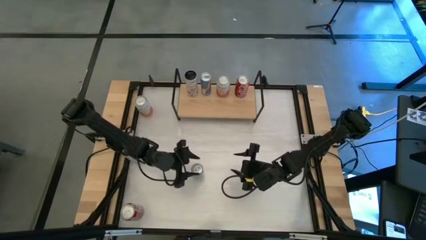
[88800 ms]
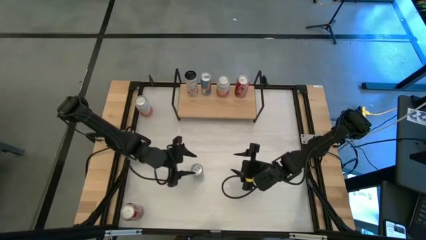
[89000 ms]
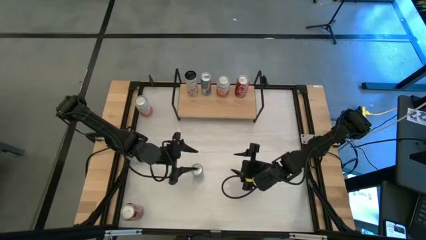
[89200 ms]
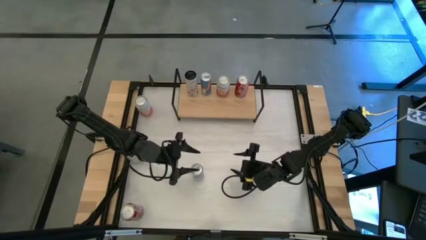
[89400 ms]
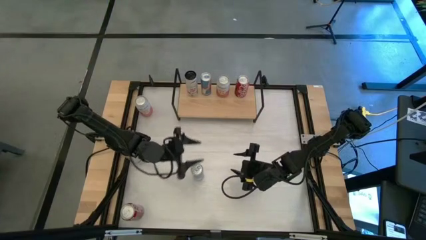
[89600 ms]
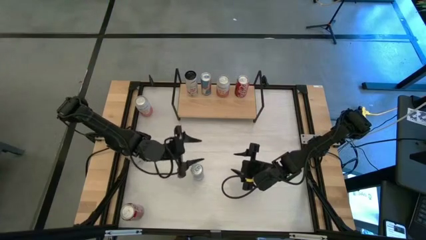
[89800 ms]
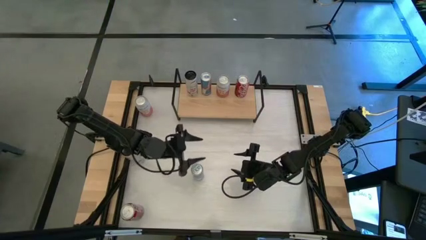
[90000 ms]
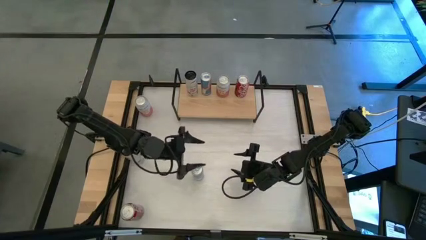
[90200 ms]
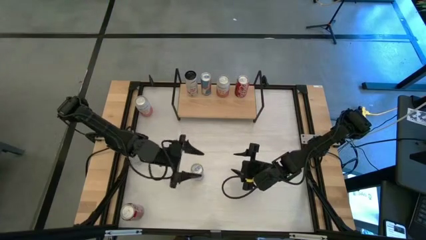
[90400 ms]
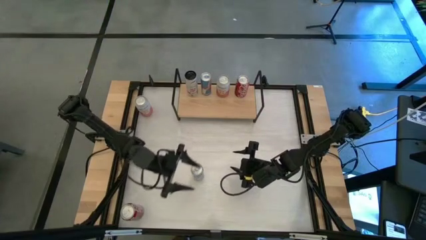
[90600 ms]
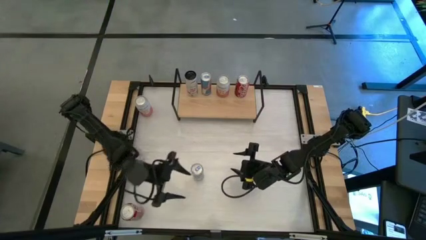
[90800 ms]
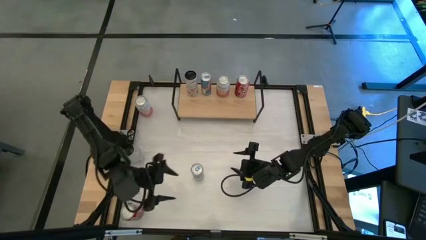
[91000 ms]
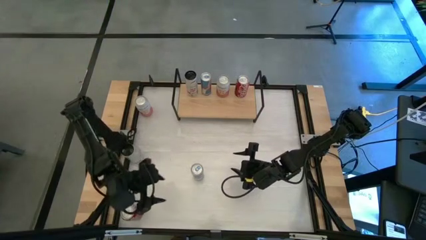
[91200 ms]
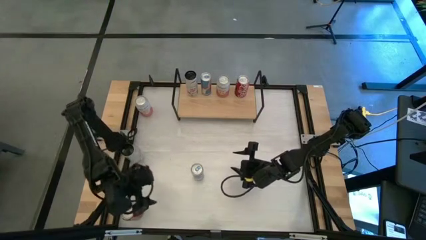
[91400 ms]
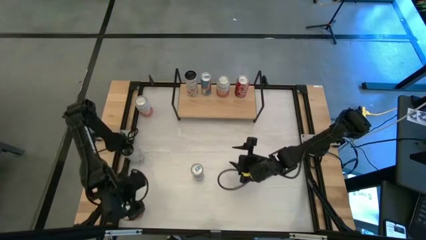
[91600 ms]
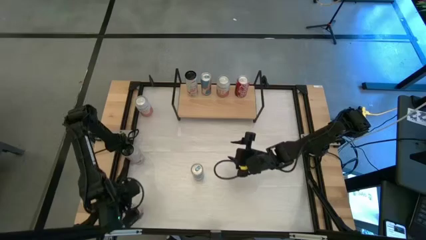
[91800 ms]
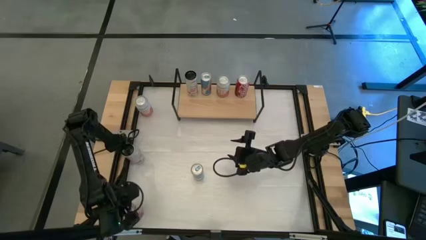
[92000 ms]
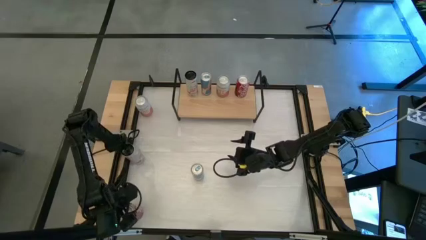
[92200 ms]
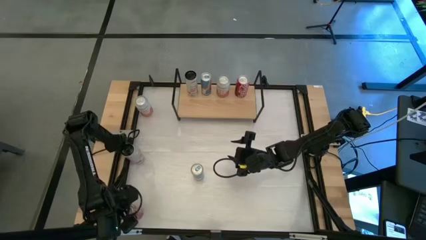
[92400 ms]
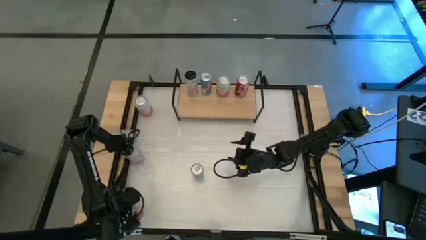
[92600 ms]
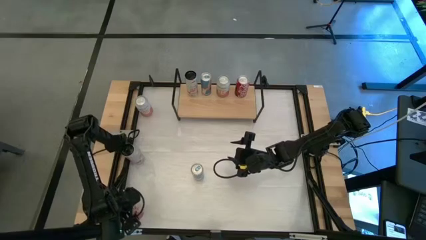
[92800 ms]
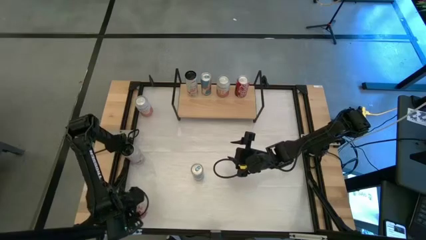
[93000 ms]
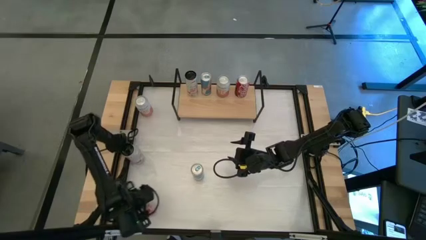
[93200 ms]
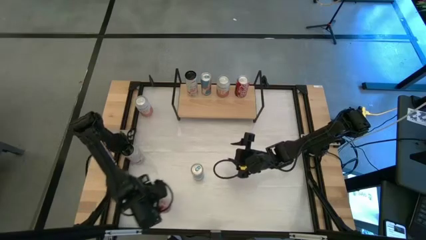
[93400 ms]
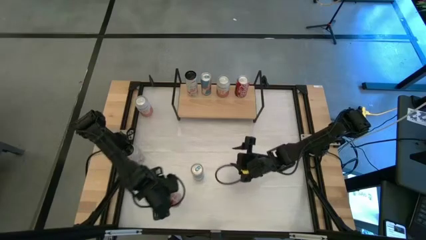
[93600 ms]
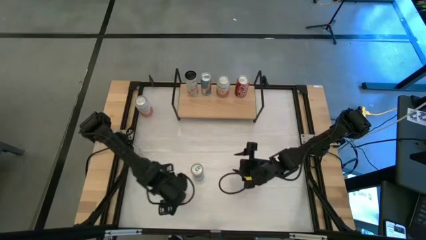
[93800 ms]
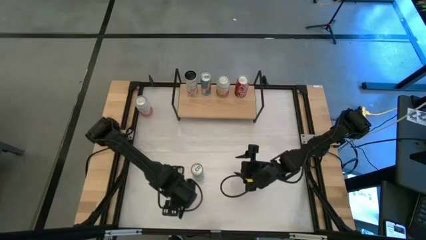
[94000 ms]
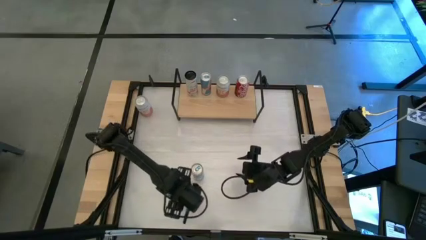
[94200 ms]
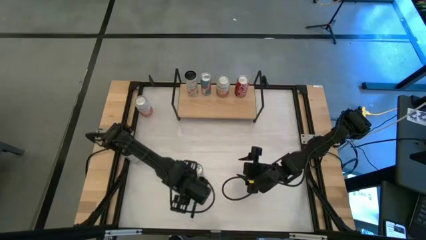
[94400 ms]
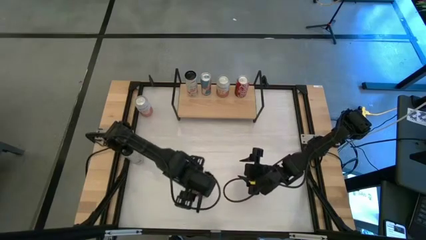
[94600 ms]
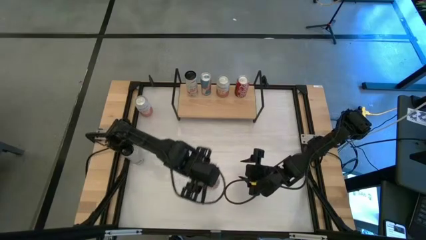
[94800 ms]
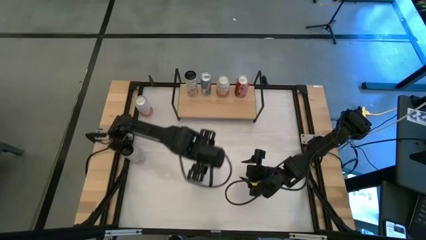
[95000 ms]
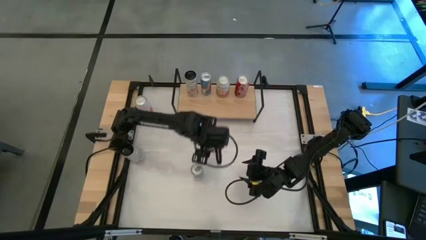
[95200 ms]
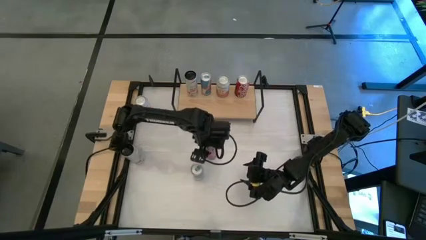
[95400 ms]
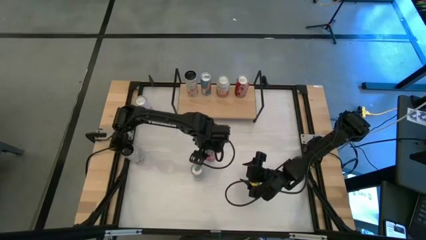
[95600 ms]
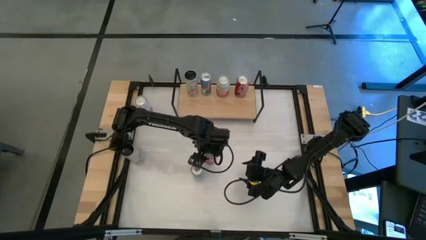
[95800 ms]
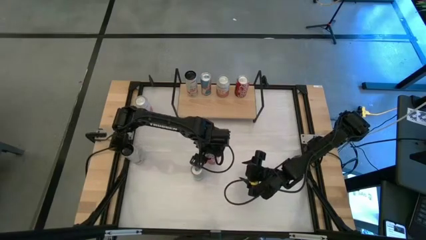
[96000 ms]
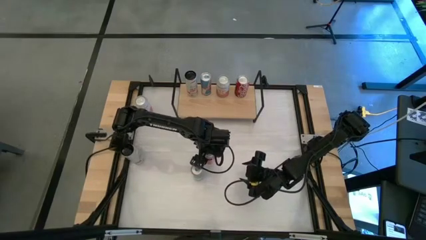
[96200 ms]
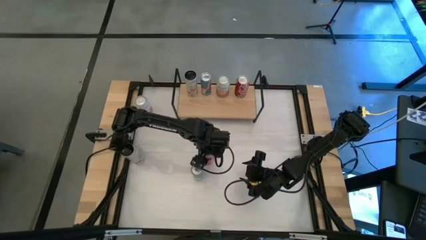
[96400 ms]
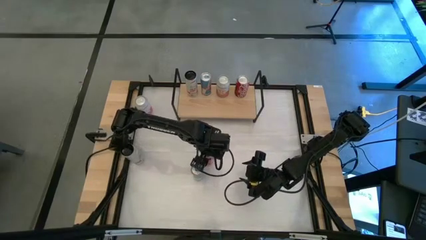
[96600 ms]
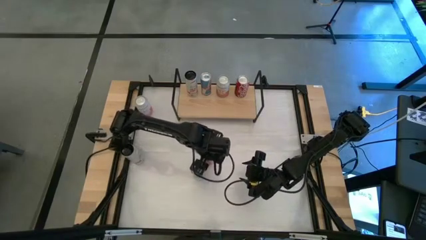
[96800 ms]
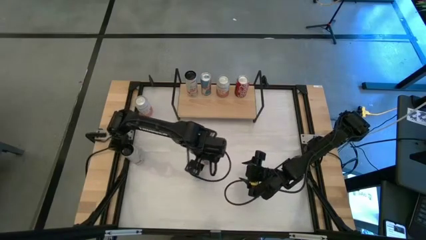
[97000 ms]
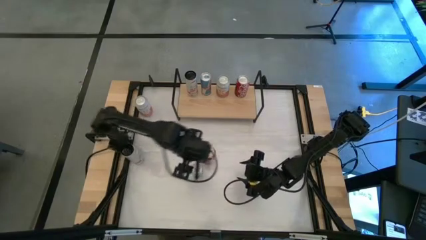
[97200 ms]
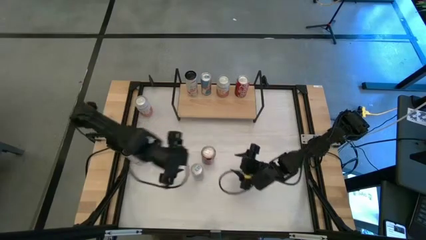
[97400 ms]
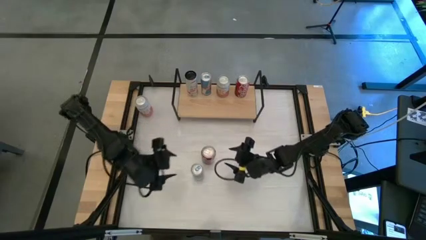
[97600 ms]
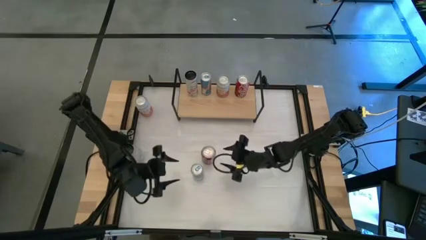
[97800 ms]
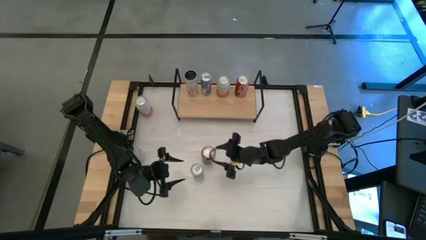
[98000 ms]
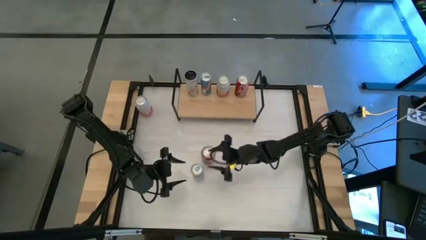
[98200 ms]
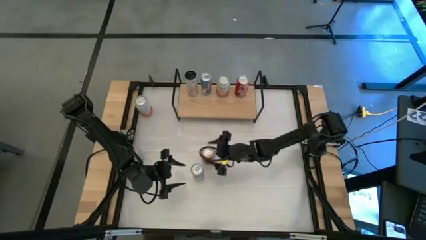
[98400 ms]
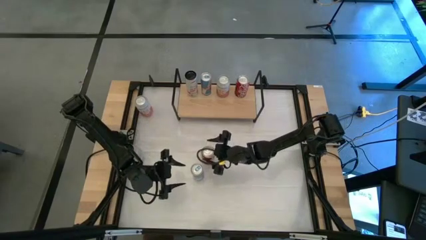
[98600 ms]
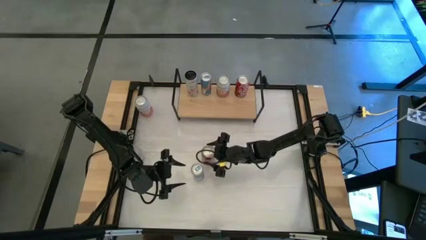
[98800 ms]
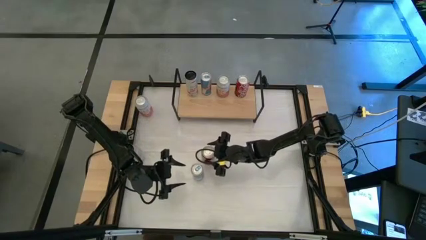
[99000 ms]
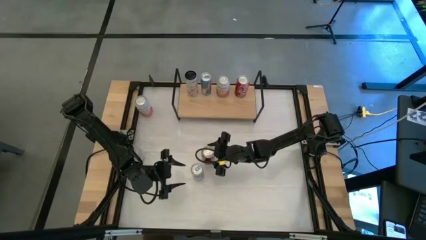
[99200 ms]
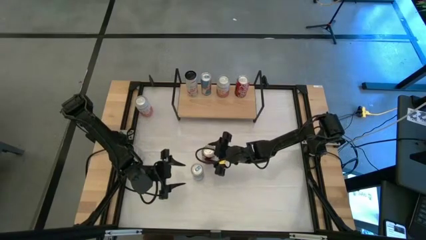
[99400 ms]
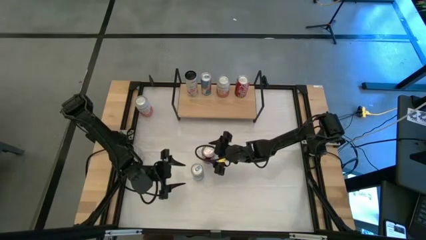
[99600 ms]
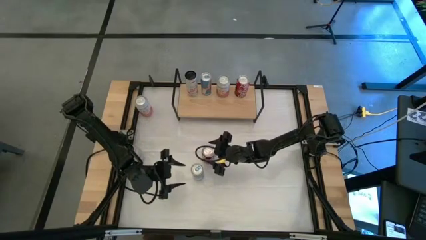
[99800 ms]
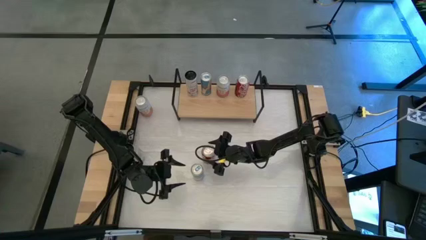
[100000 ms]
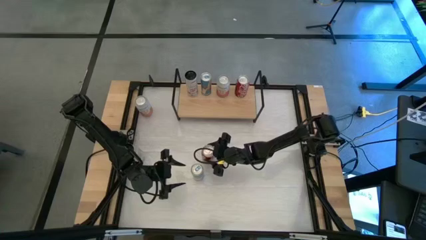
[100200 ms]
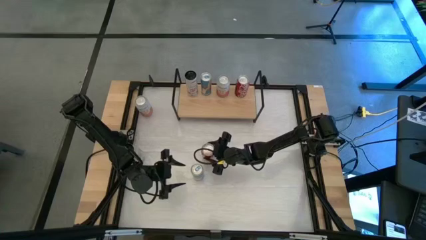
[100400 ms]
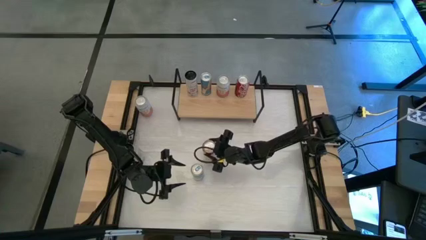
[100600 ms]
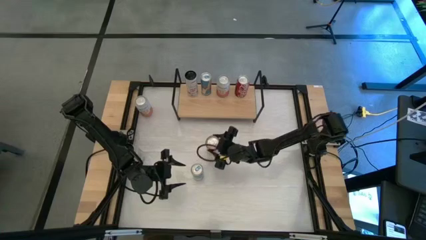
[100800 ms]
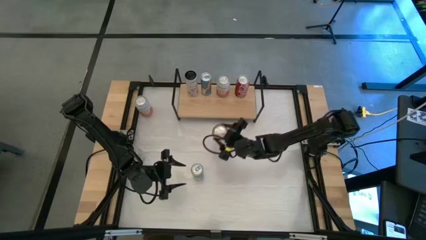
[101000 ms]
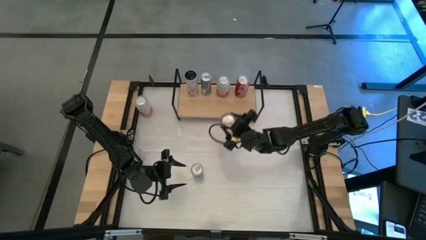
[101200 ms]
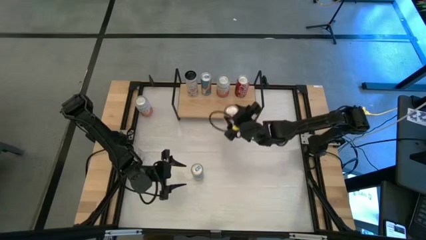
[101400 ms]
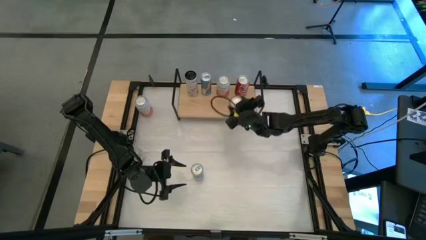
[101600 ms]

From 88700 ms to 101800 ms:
Task: Place canned beverage on shelf
Put the red soda can align with the other red soda can on the shelf

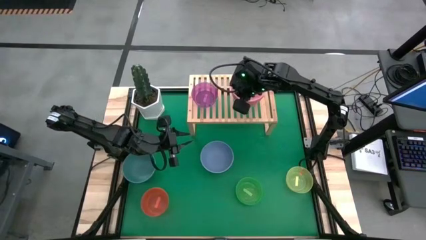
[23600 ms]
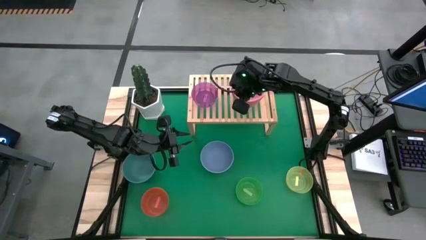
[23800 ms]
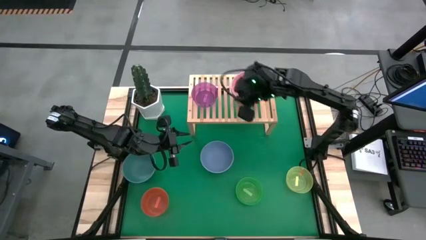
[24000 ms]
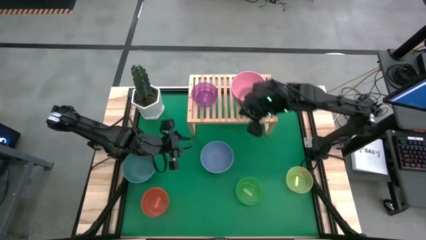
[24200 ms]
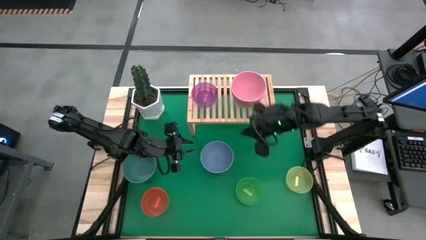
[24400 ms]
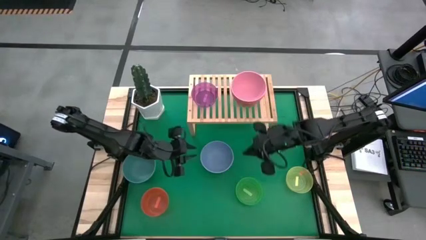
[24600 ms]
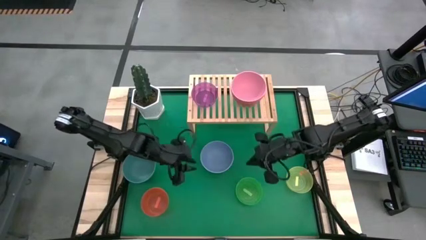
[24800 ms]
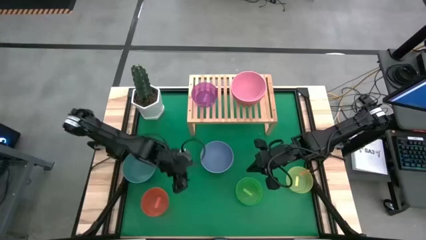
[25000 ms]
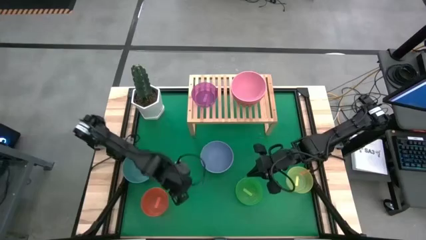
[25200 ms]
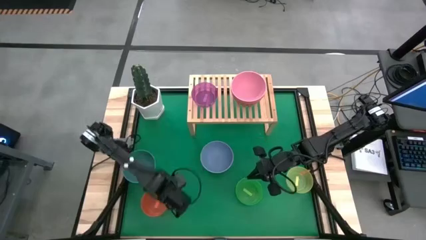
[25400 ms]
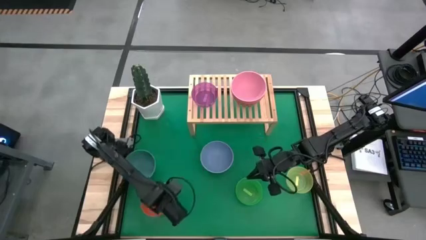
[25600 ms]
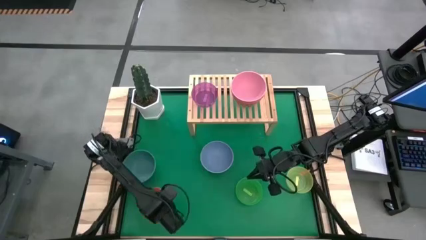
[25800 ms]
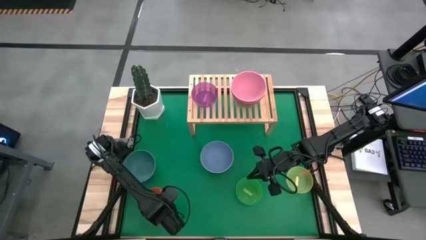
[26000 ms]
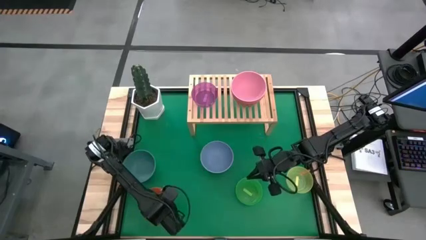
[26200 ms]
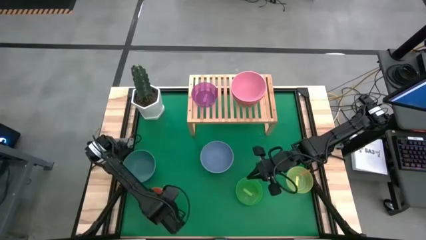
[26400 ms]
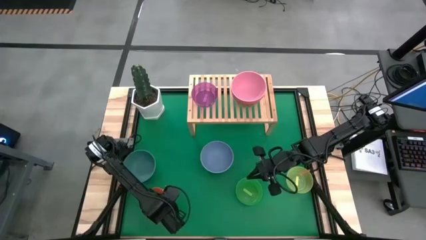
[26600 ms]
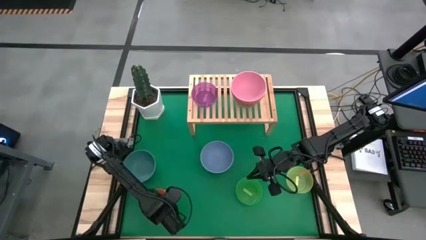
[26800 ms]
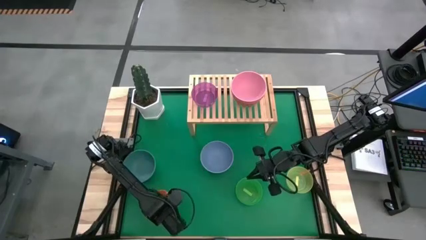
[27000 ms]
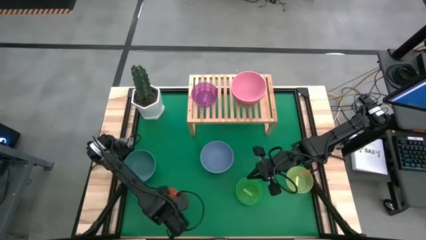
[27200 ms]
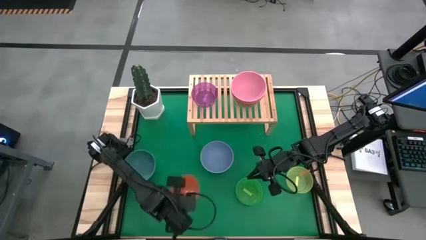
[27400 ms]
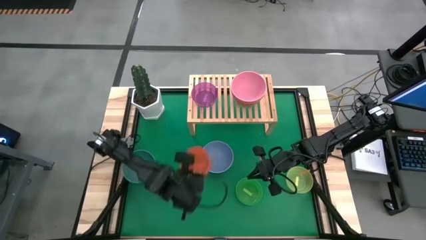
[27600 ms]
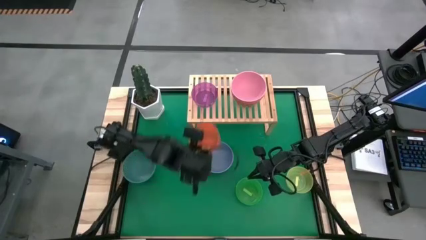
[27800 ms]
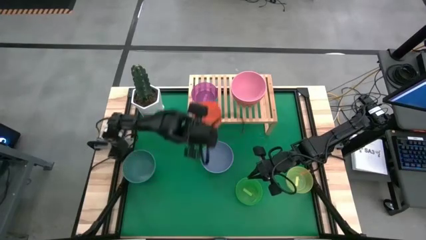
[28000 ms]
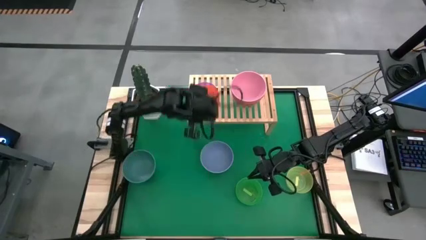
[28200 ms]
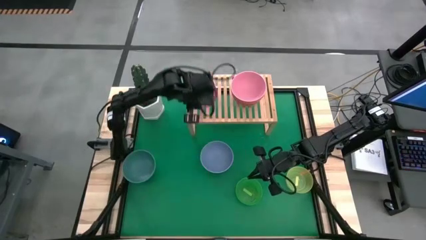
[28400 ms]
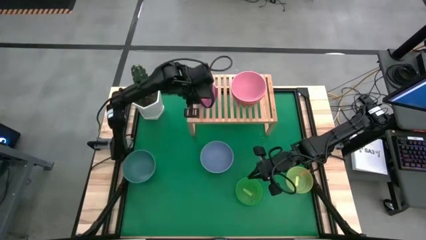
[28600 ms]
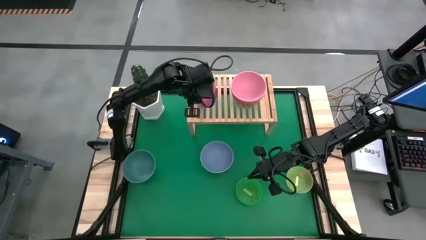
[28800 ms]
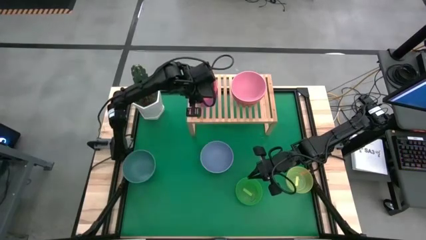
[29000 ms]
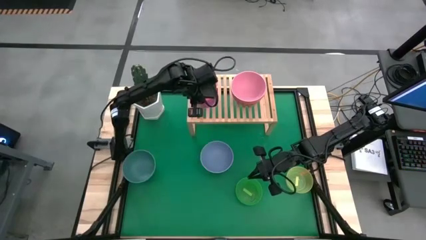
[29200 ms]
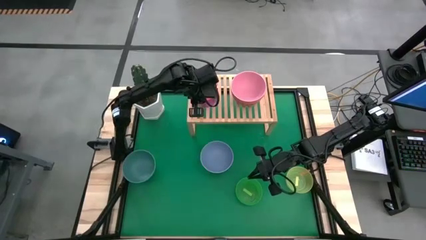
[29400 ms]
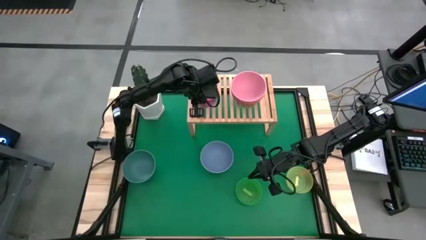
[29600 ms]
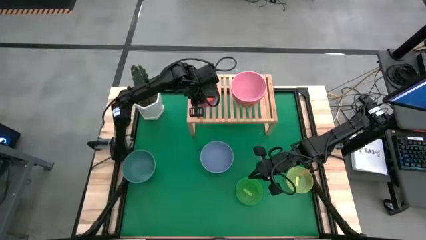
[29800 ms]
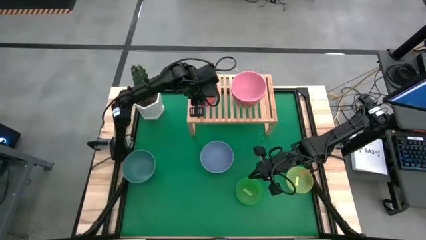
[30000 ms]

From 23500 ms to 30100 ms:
Task: Place and stack bowls onto a shelf
Stack the light orange bowl on top of the violet bowl on the shelf
